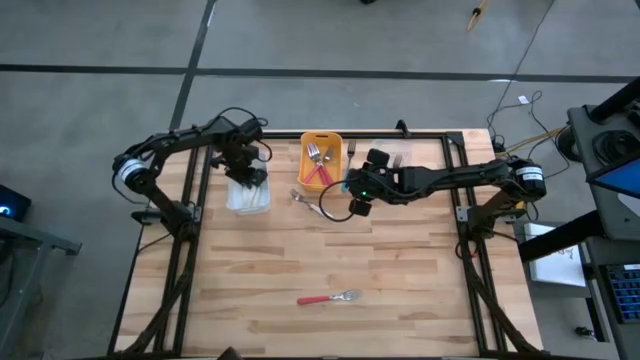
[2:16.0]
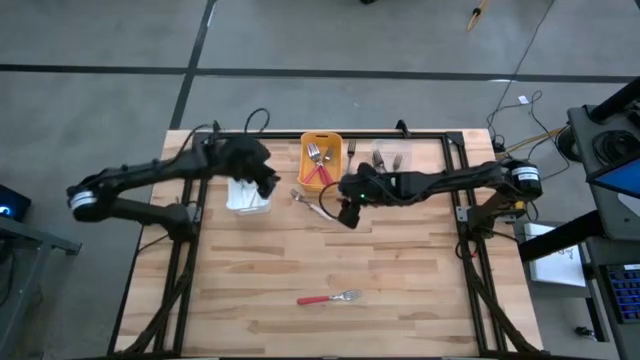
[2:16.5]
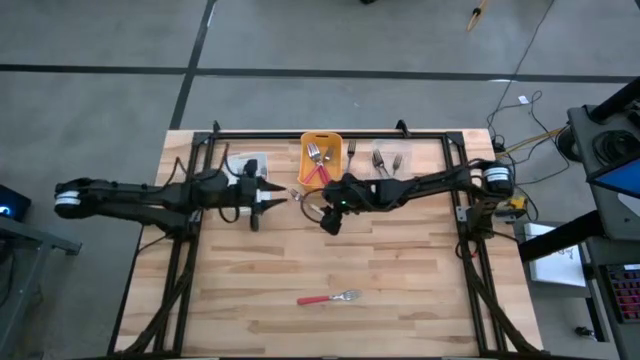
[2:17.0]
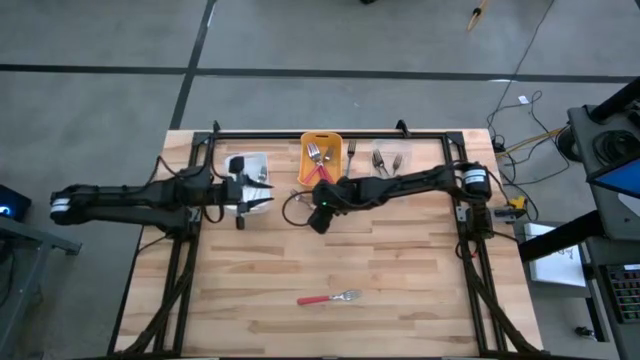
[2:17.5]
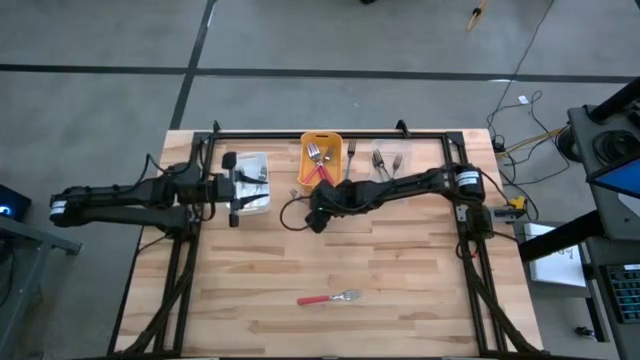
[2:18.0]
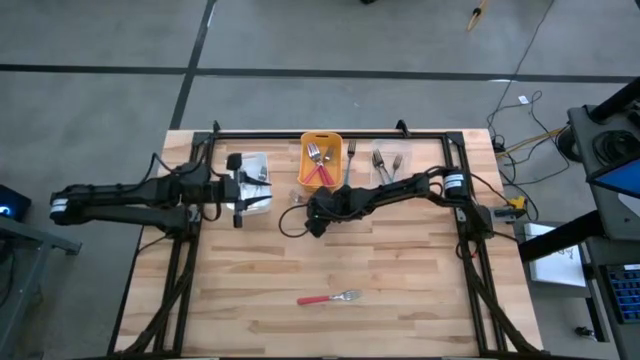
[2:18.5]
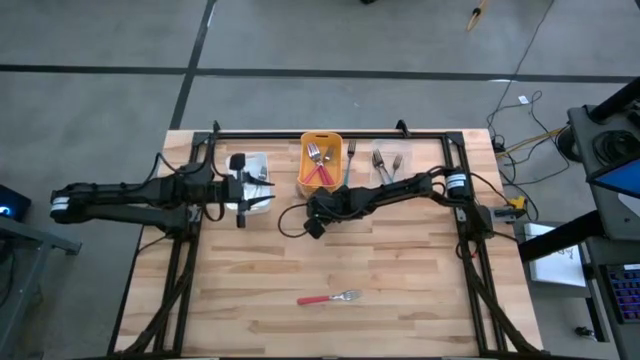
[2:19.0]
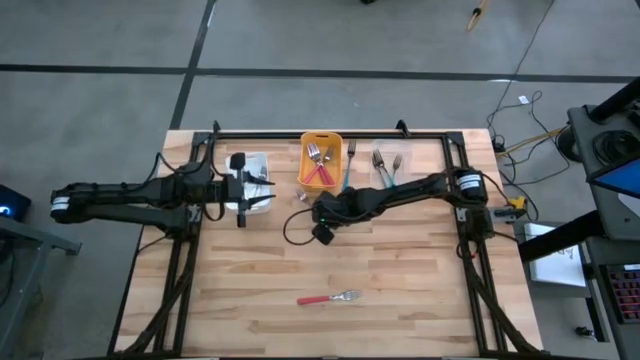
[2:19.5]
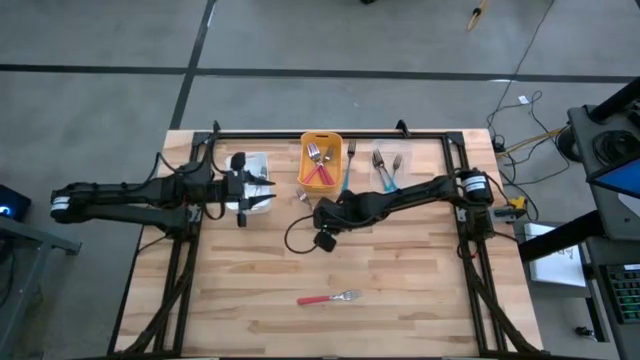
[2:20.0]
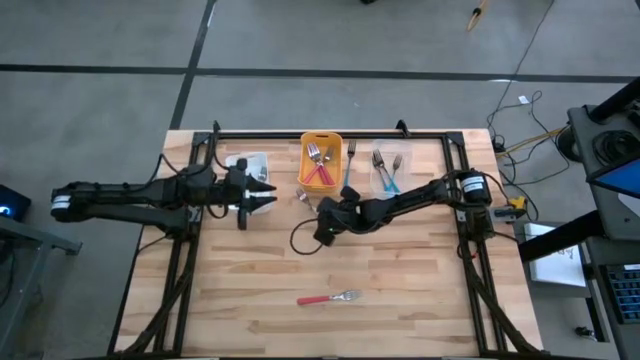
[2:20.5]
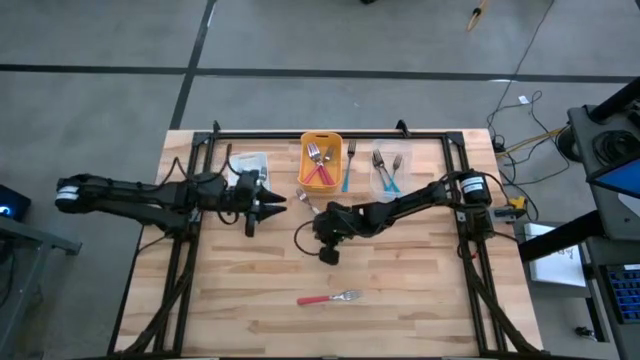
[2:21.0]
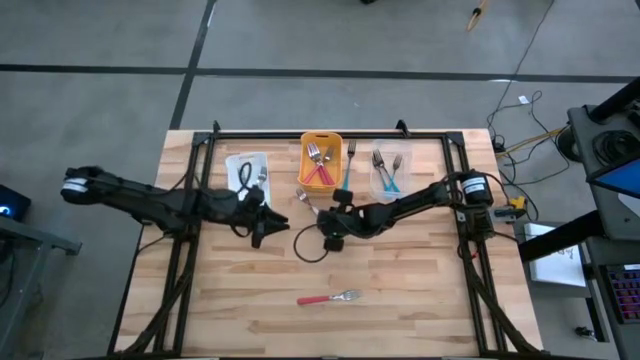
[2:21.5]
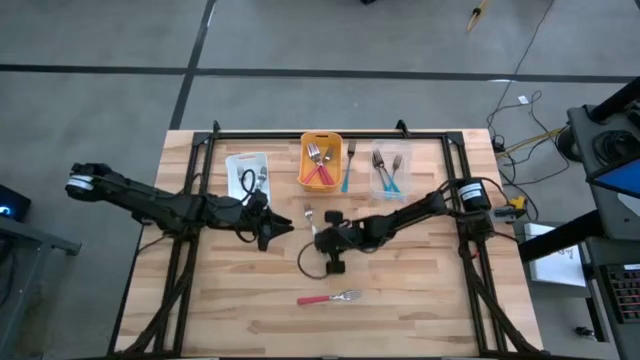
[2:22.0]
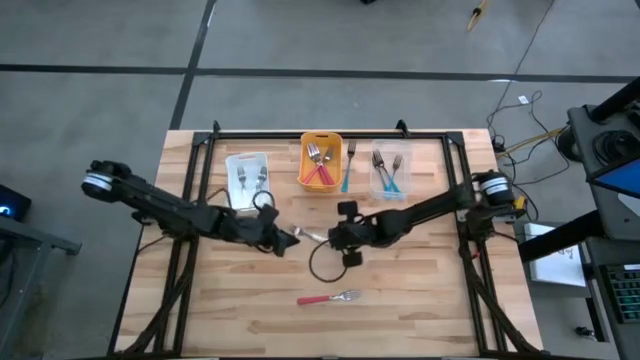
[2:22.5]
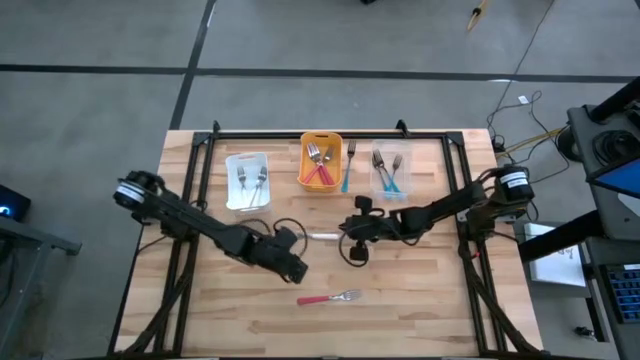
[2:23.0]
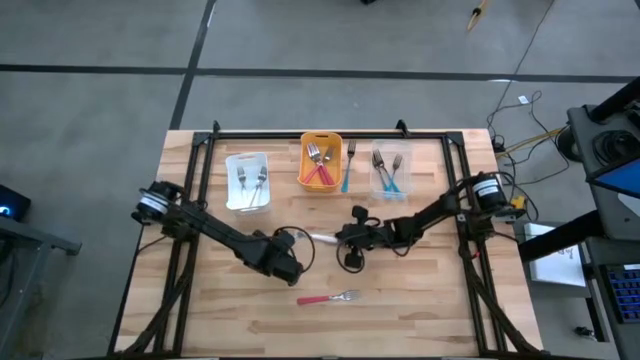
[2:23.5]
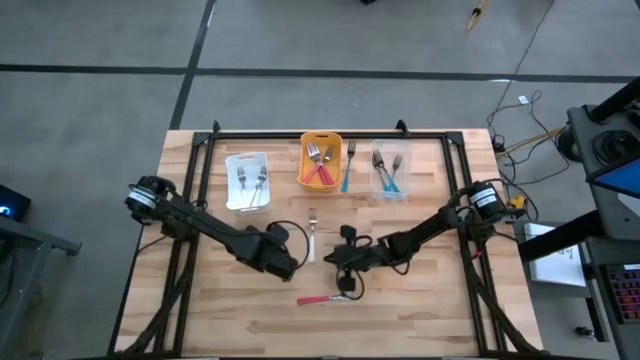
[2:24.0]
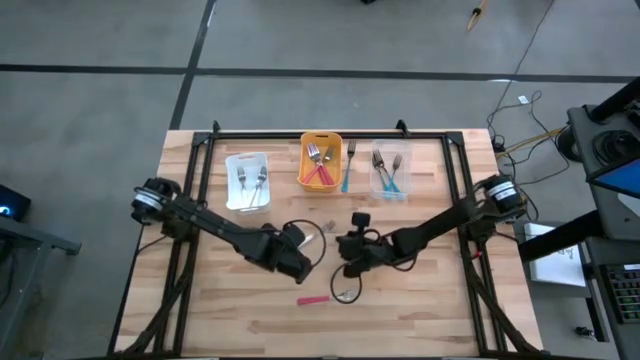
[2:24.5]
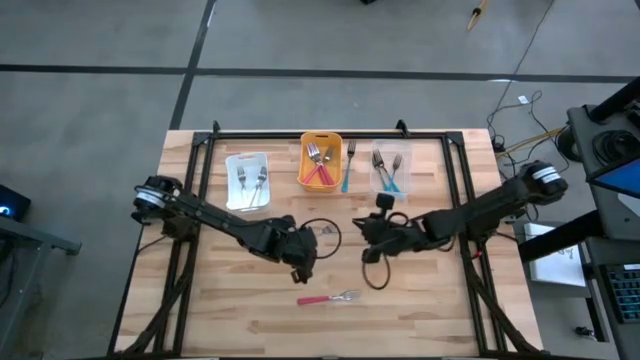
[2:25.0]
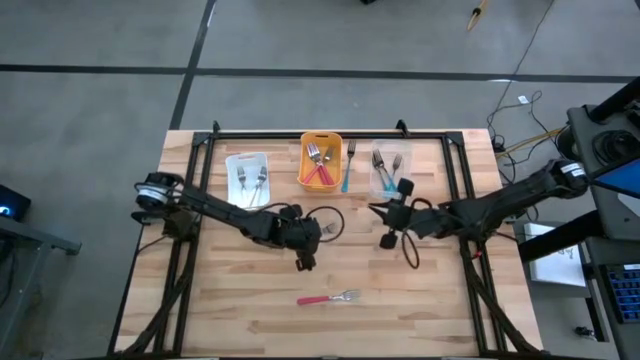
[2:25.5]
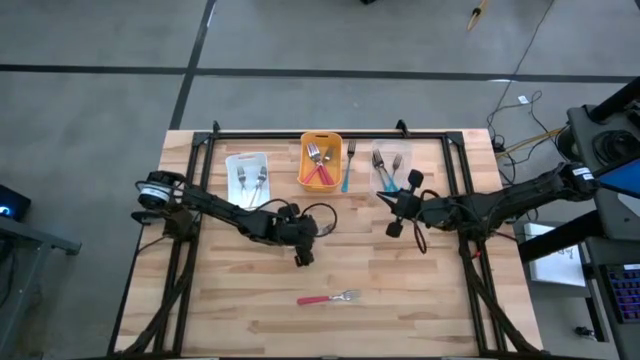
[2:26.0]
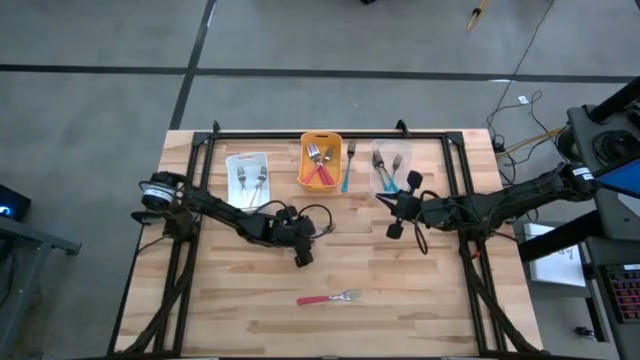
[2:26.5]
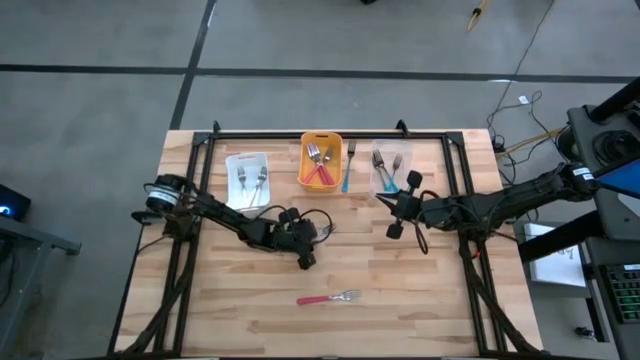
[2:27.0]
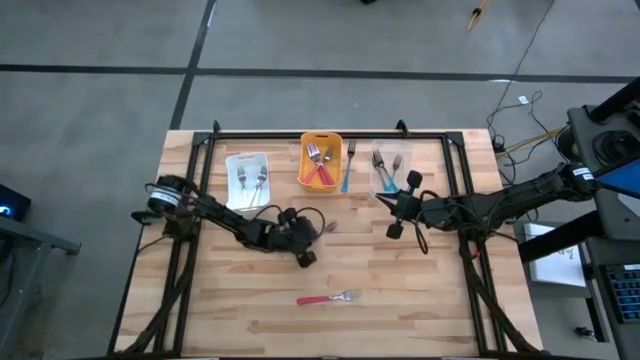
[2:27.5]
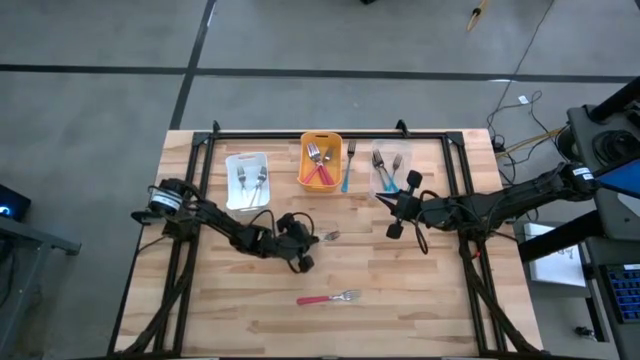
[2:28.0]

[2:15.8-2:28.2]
Task: Sort silverware by color (type)
Put the white fork into the white bin

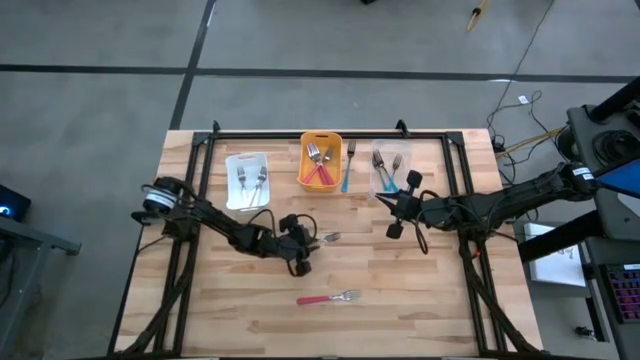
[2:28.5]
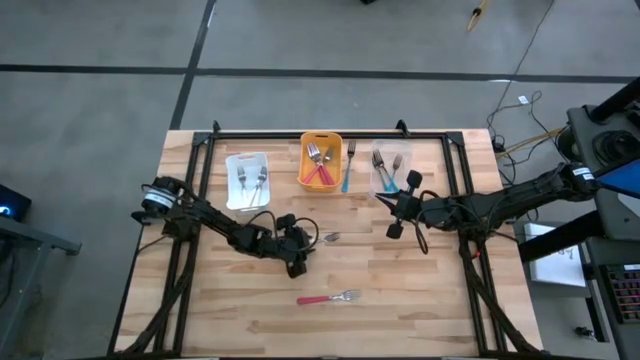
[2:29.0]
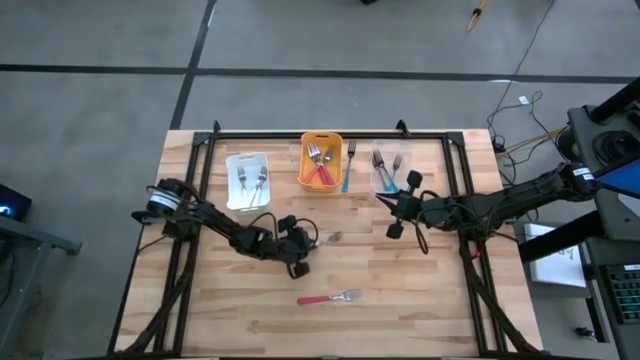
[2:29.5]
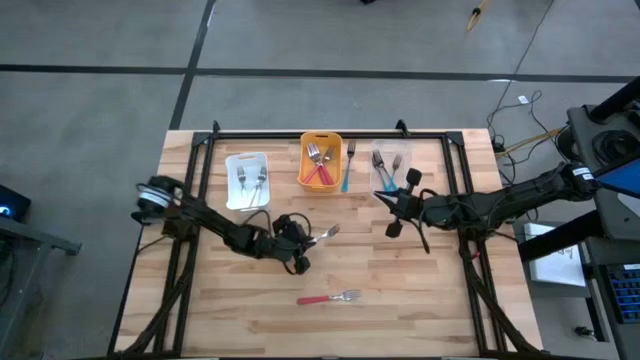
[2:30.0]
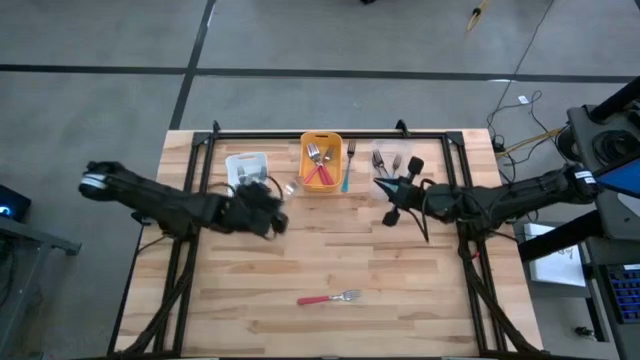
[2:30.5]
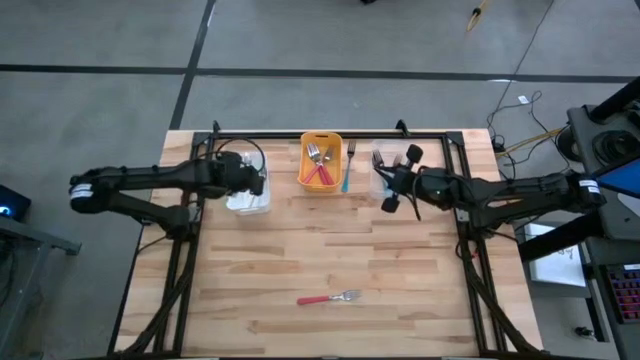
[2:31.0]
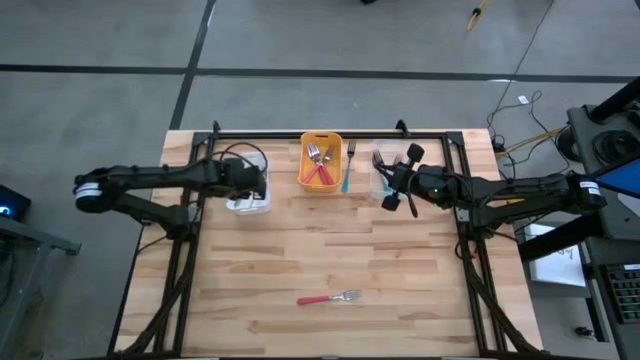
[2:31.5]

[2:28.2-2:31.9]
Put the white fork into the white bin

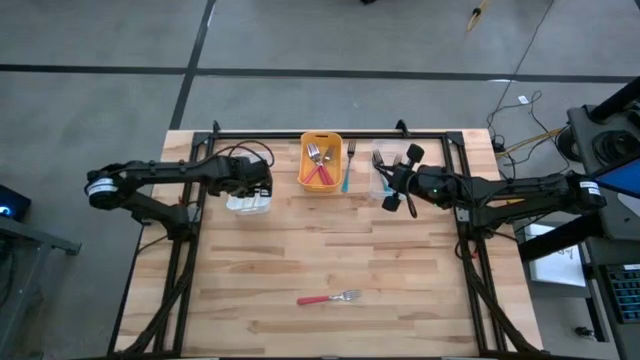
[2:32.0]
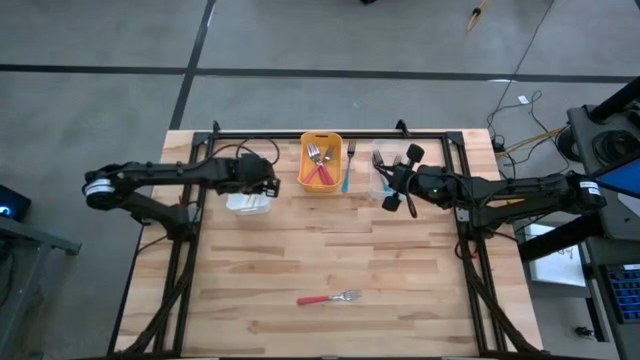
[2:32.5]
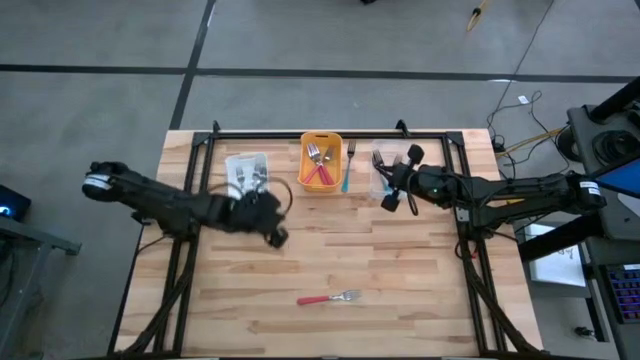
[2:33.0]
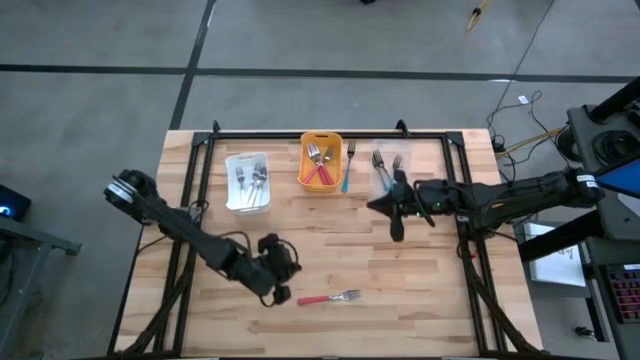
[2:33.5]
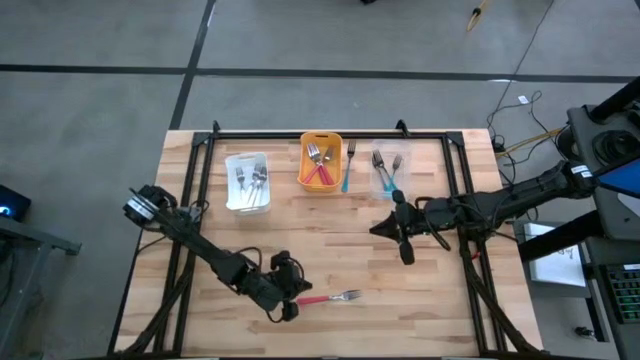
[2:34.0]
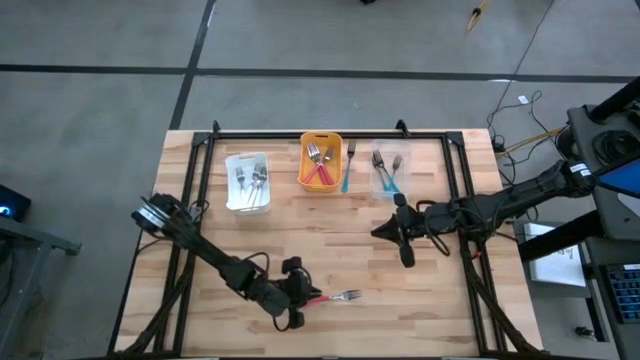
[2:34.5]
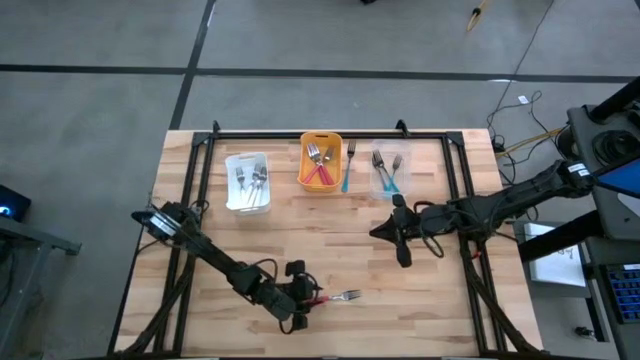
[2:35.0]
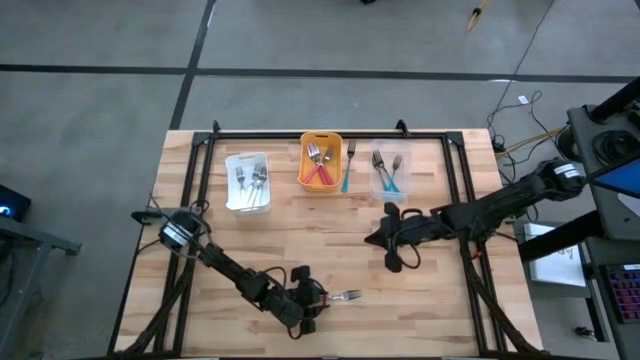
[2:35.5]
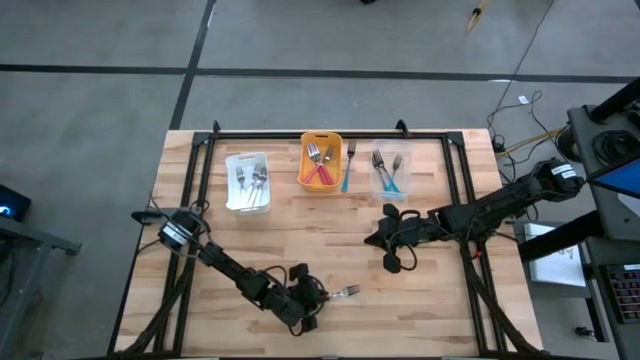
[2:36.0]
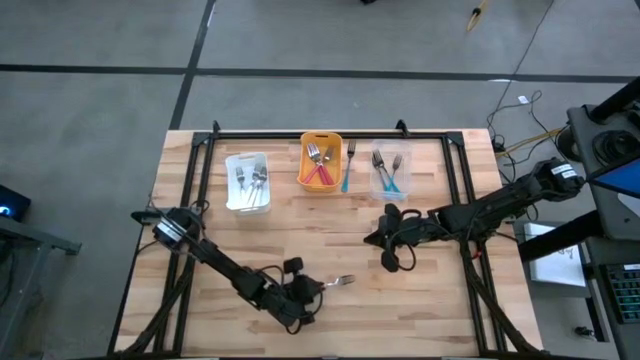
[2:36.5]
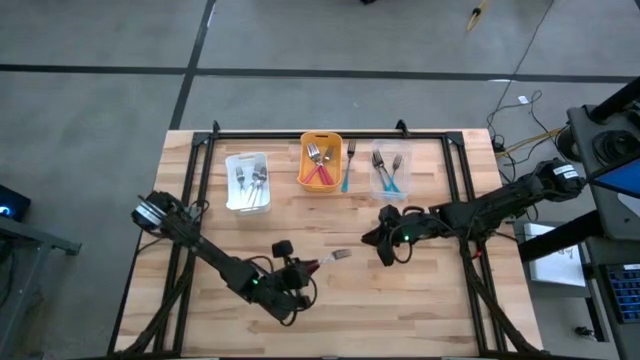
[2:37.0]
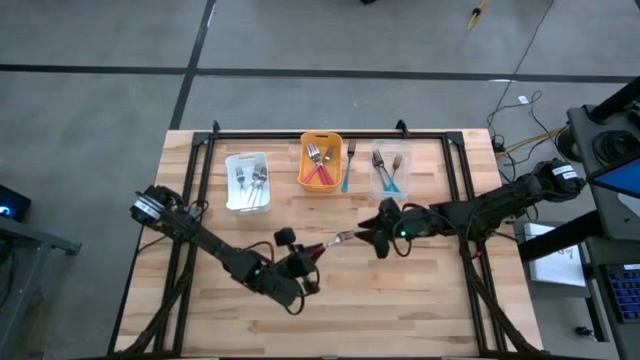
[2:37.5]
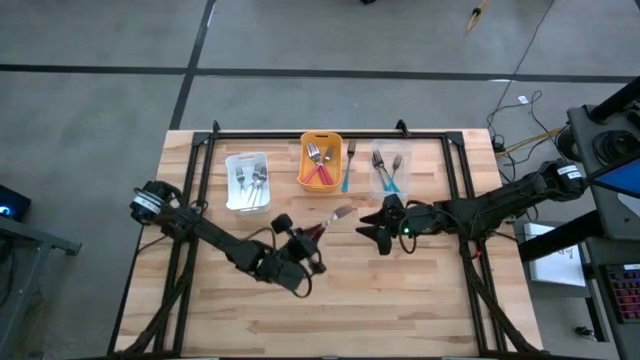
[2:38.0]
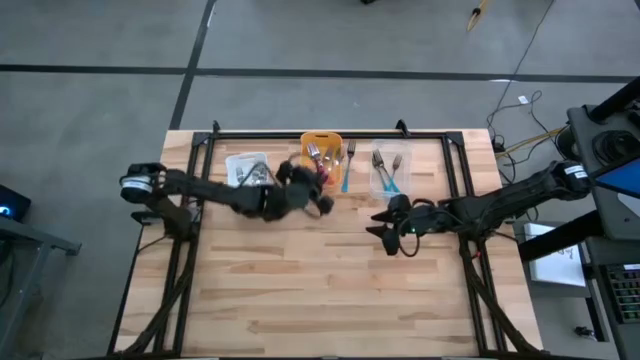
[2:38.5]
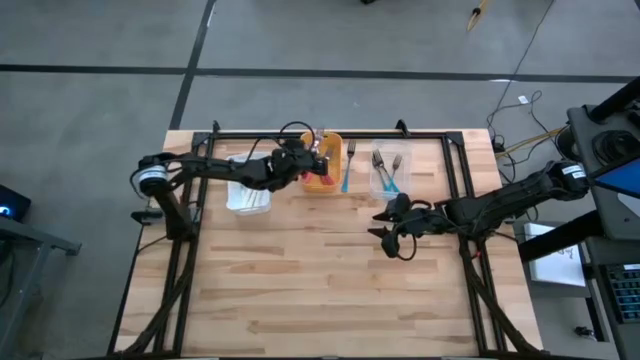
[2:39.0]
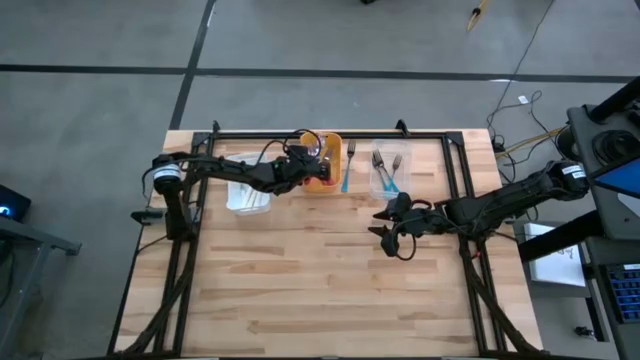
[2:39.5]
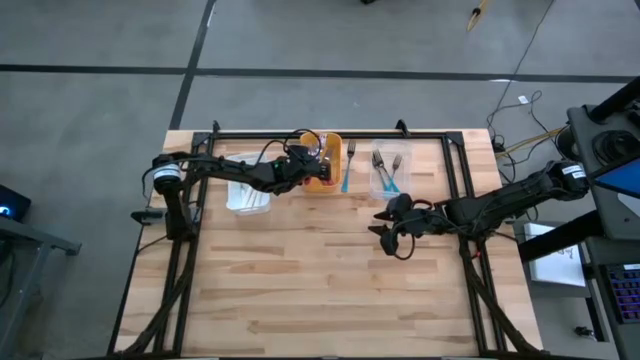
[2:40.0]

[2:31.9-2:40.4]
Put the pink fork into the yellow bin
